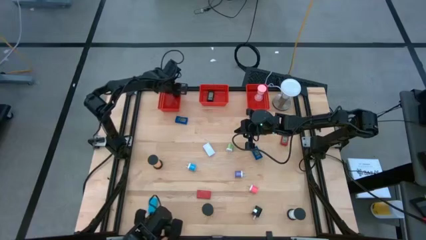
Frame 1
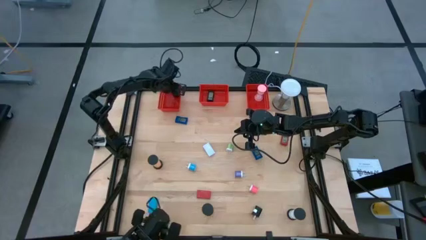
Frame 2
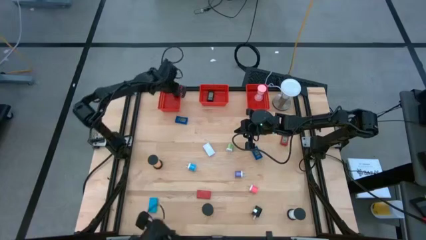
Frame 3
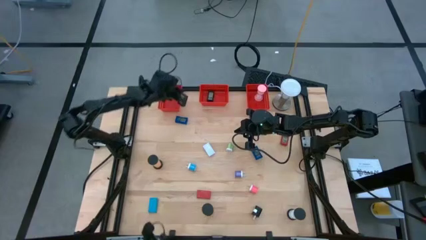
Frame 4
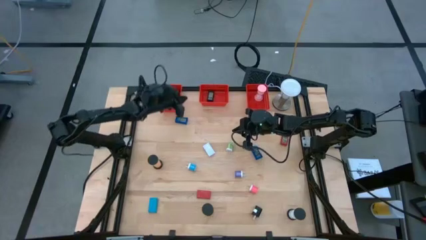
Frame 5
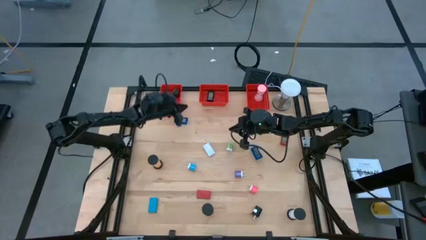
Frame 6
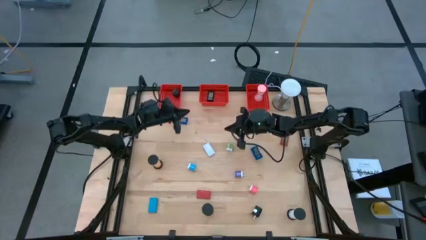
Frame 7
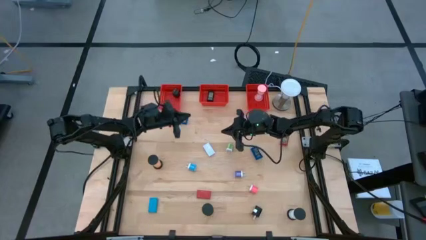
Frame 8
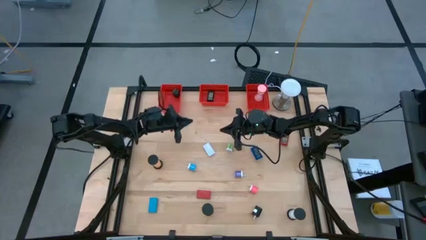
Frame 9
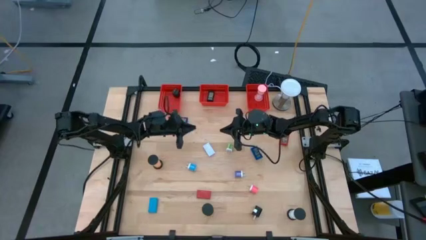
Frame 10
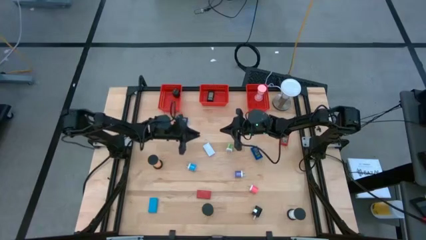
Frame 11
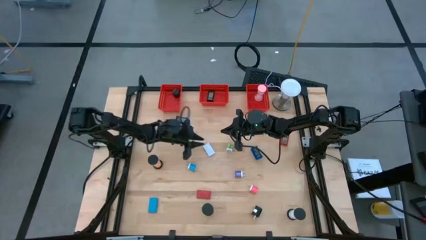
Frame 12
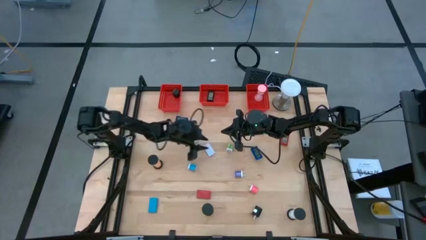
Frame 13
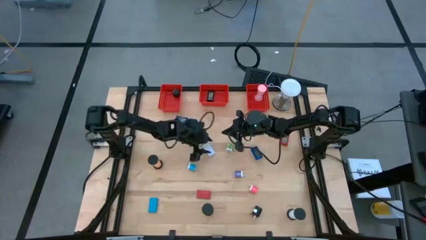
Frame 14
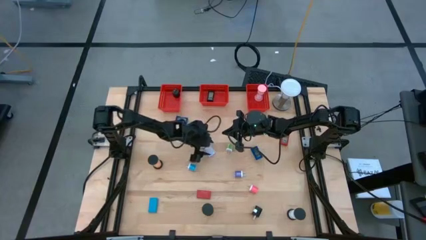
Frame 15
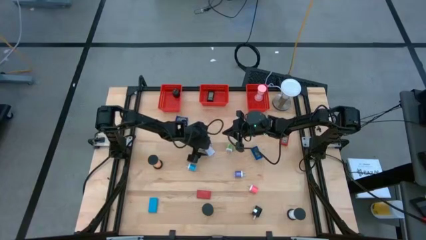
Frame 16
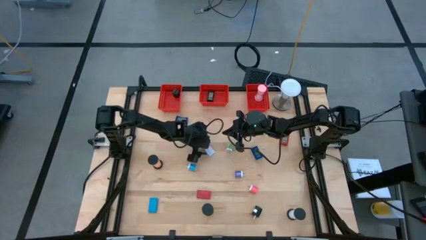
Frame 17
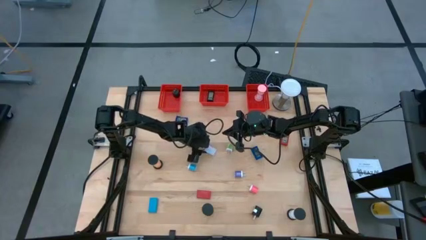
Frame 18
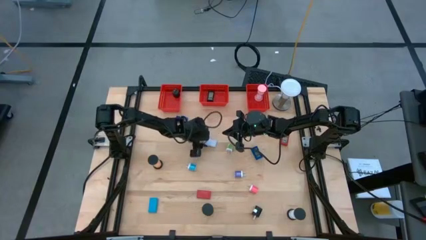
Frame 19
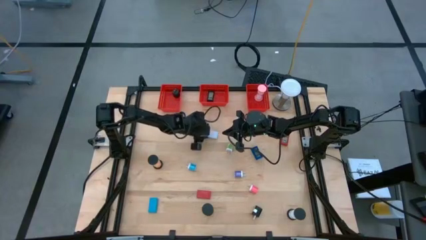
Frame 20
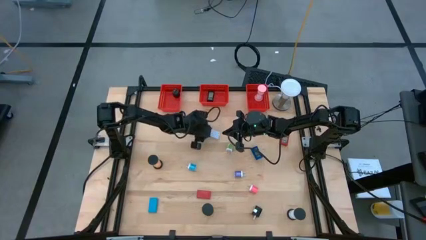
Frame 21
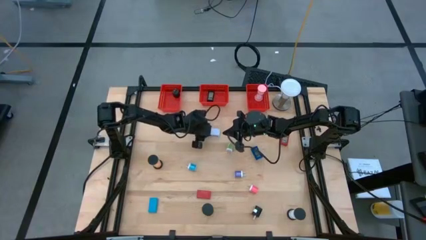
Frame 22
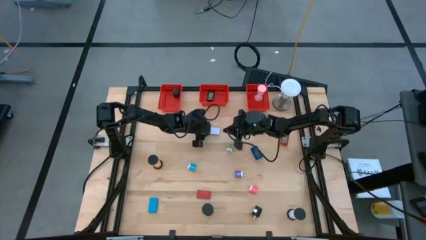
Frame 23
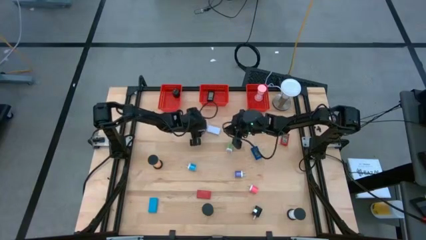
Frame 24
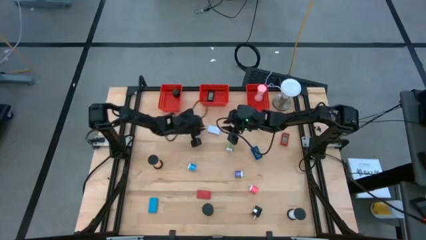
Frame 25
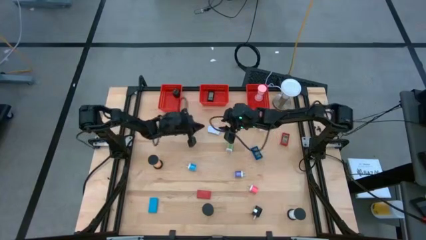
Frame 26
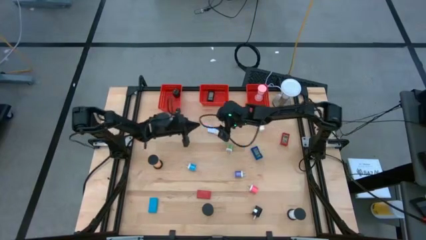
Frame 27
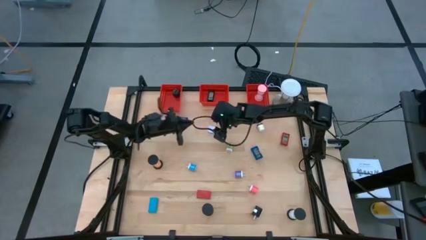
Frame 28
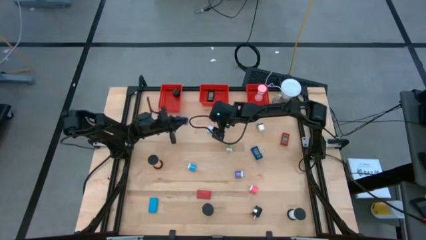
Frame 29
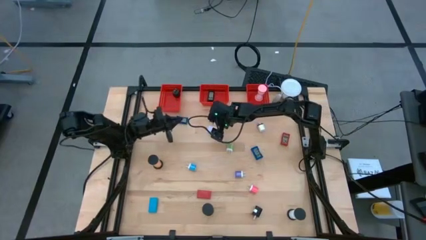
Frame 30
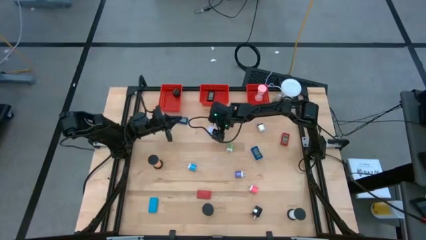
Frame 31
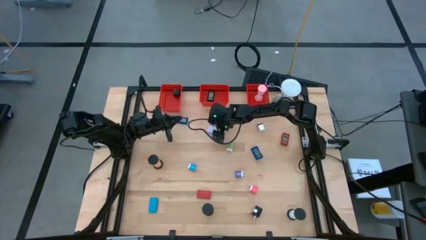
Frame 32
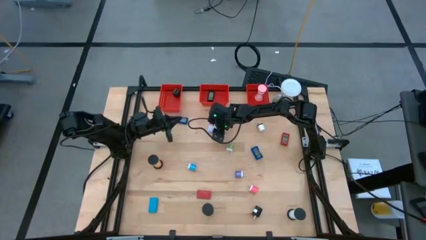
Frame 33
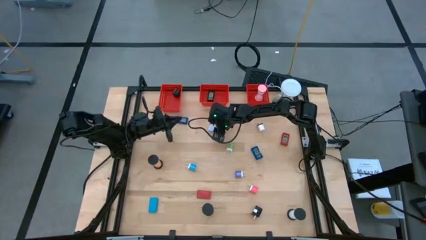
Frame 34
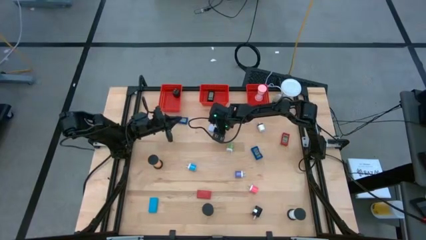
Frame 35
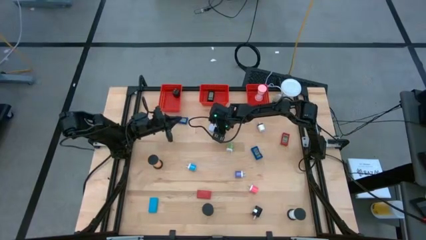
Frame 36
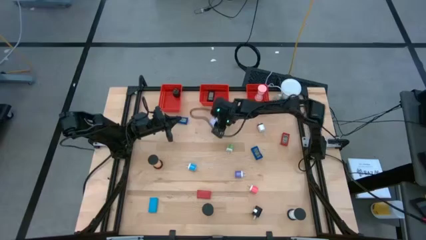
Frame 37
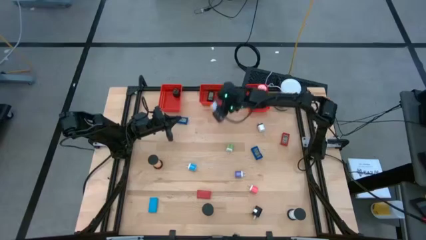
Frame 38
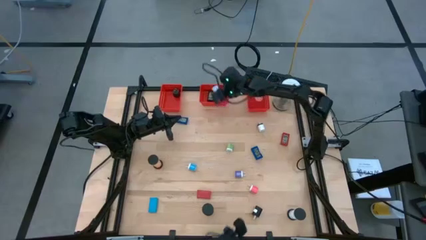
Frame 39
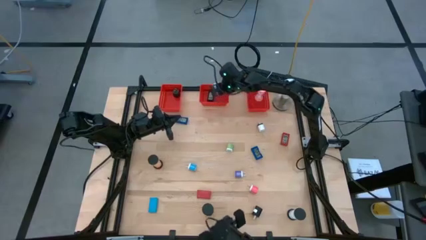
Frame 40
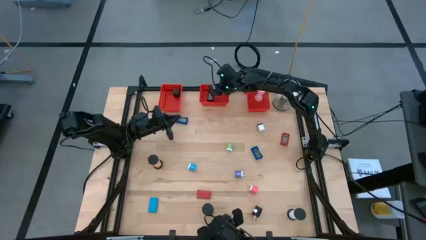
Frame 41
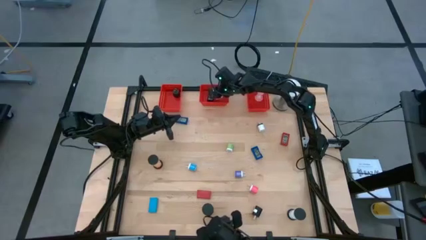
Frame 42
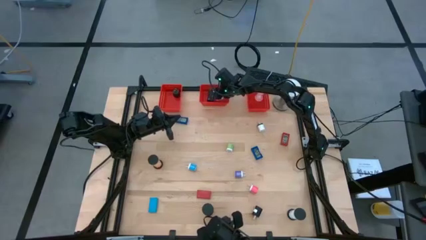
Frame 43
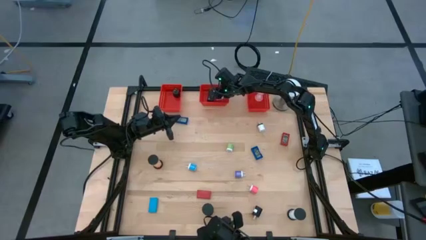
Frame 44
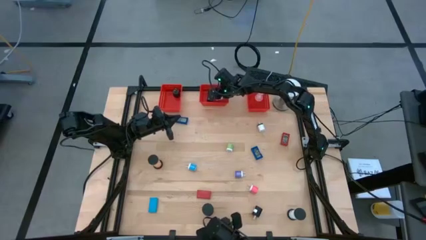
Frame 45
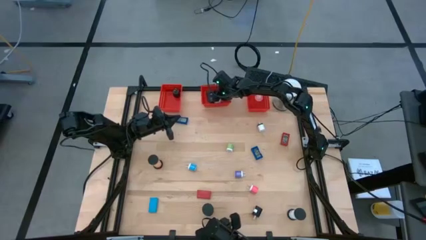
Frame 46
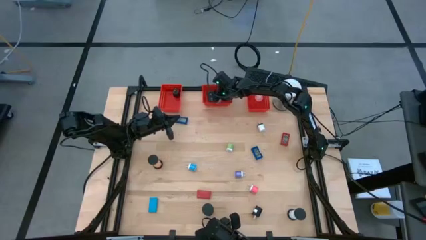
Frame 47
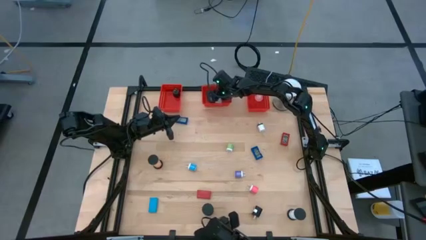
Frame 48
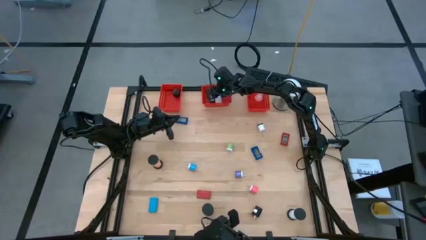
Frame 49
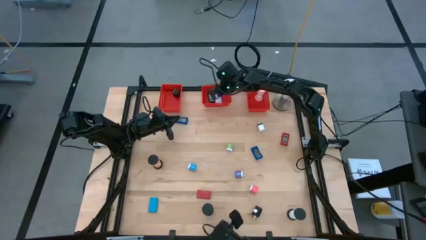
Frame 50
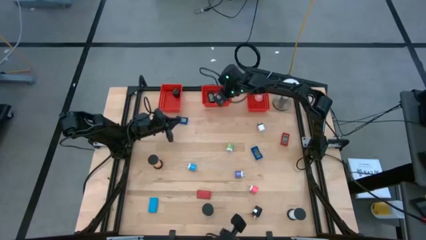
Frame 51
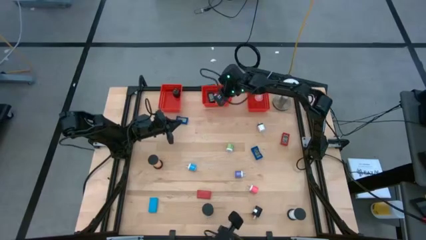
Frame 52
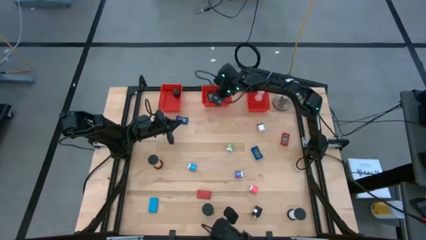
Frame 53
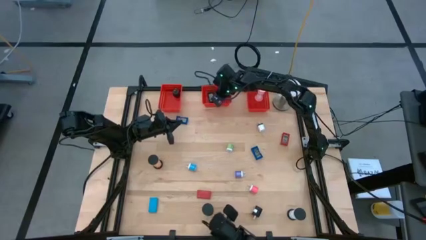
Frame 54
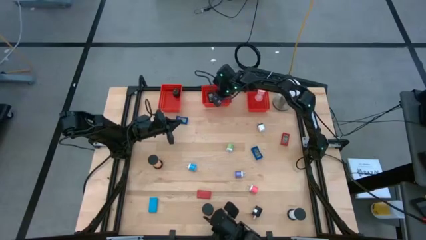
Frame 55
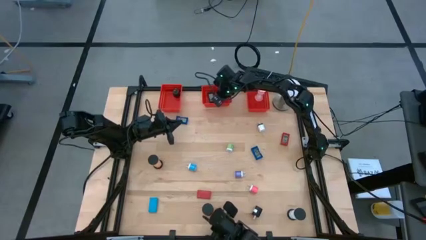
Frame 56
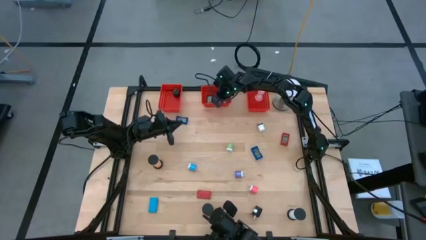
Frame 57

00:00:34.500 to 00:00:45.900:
Task: Pick & Place Office items
Put the white digital clock into the middle red bin
